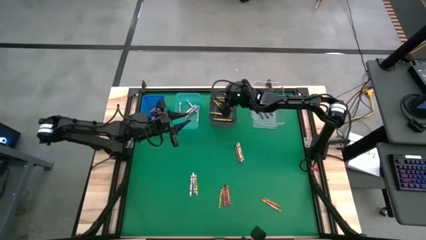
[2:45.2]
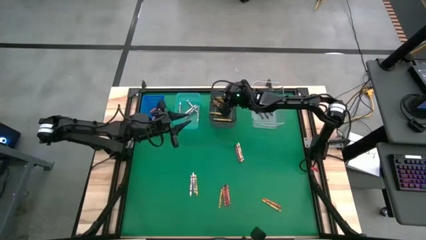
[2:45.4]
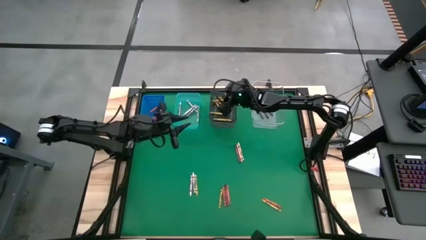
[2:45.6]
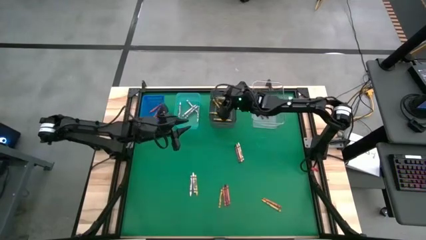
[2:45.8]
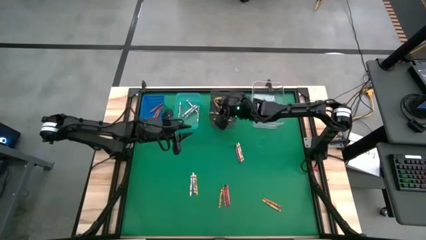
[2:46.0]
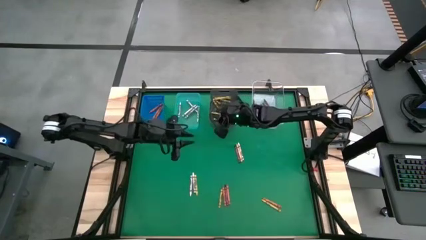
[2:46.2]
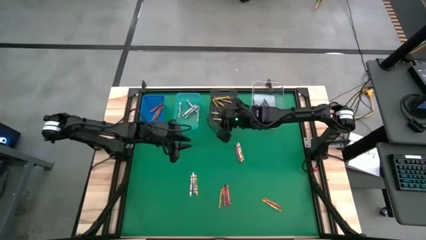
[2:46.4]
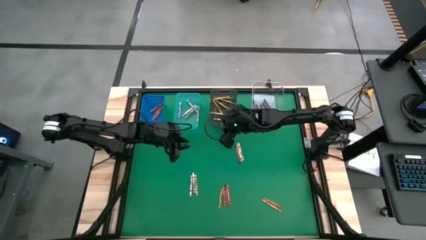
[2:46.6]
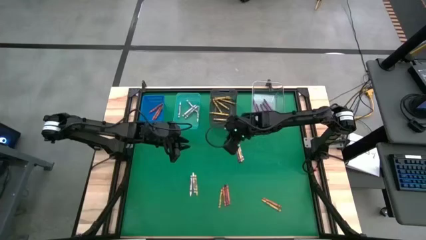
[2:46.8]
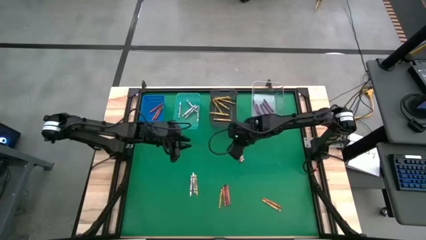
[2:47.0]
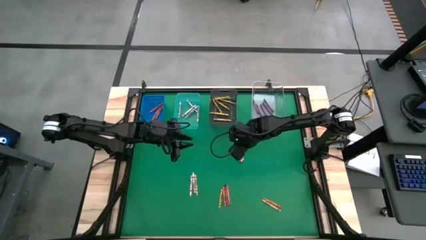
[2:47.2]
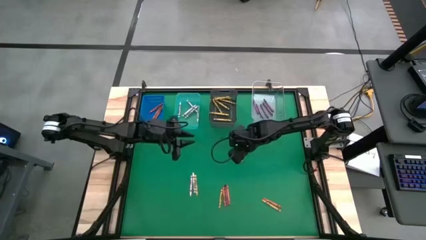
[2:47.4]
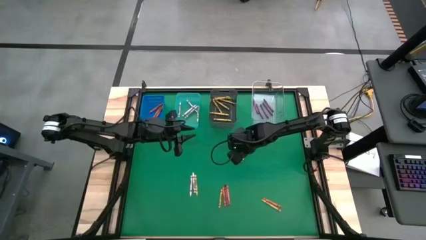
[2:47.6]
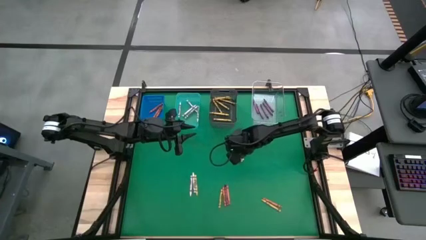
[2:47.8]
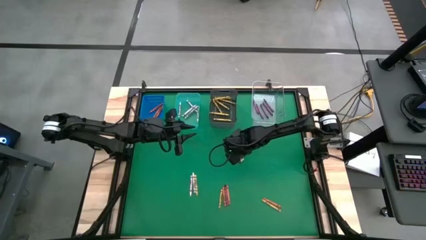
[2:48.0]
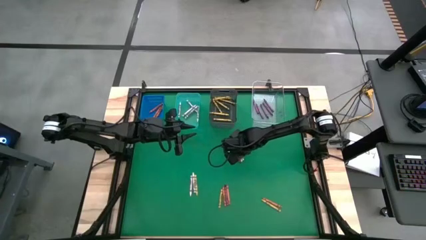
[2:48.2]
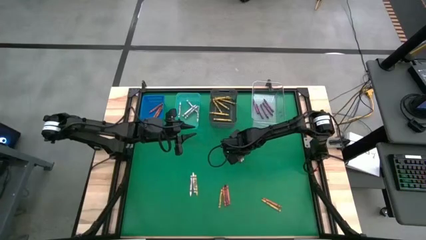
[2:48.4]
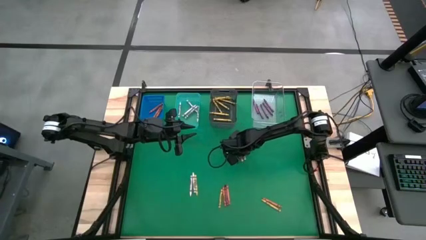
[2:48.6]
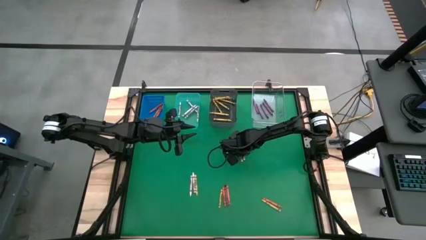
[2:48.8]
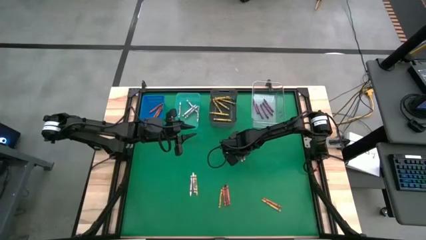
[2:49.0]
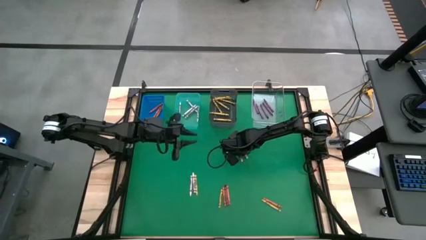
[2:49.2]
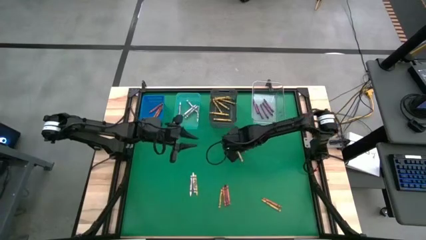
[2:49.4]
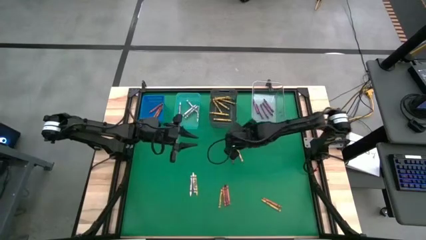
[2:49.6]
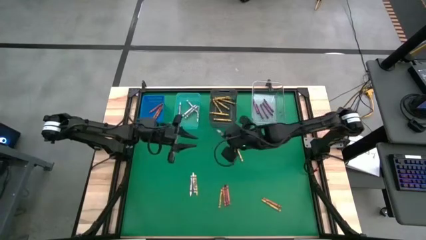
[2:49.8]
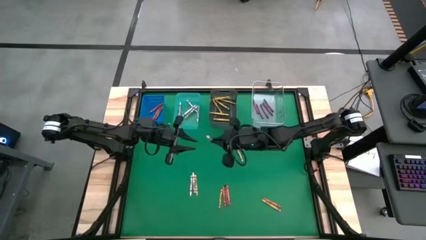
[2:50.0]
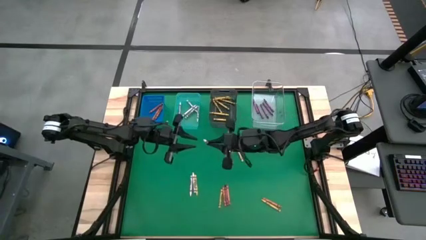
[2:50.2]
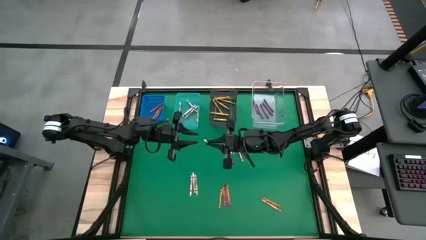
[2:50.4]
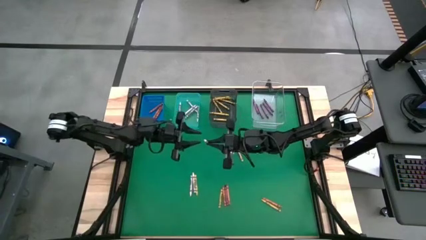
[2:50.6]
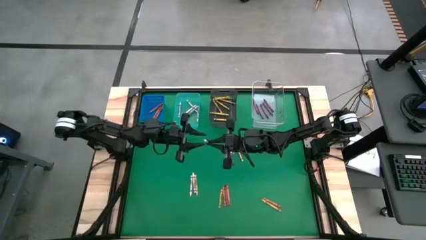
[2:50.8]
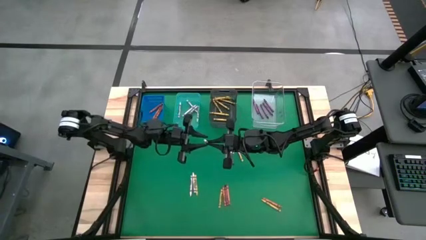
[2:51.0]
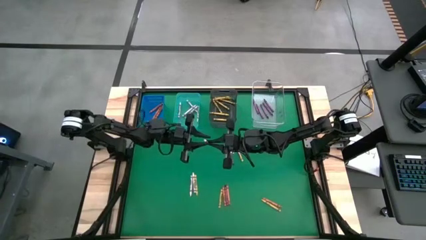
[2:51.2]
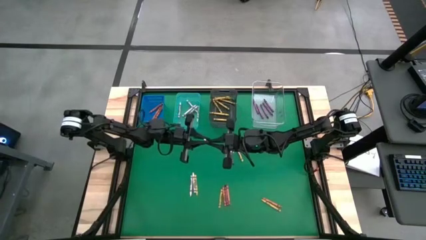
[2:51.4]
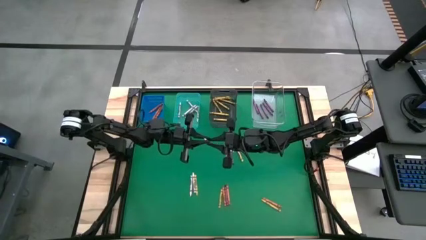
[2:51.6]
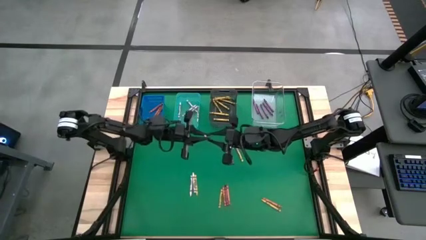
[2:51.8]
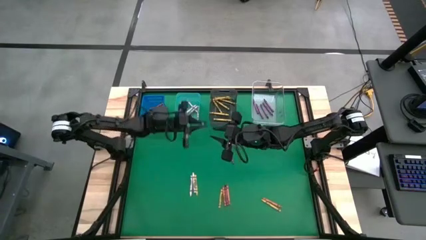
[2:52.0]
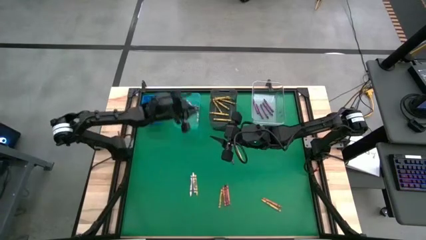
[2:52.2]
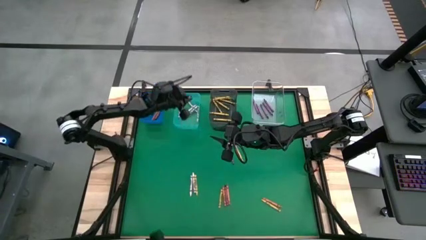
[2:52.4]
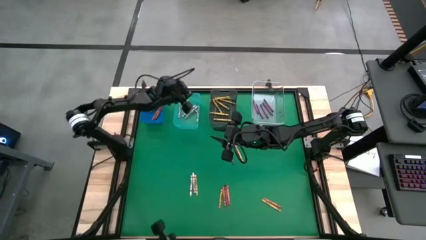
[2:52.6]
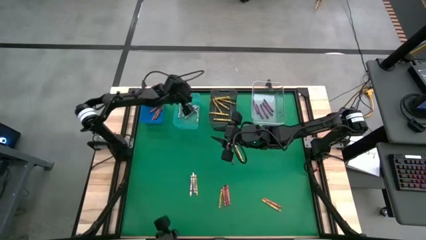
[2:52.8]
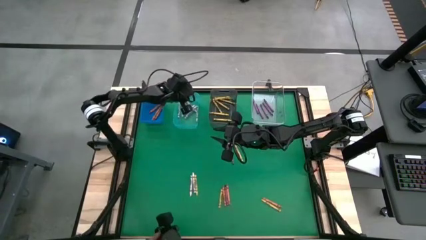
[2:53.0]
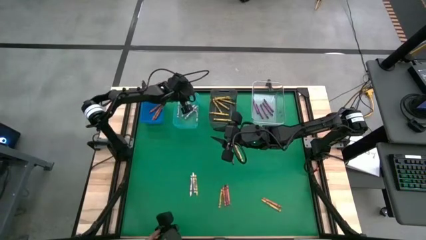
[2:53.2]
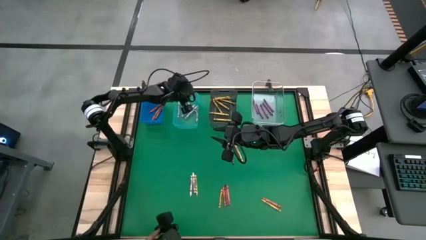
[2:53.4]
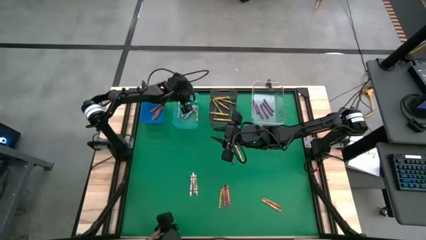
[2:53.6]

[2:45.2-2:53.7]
Task: Sort crayons
Put the white crayon into the light blue bin

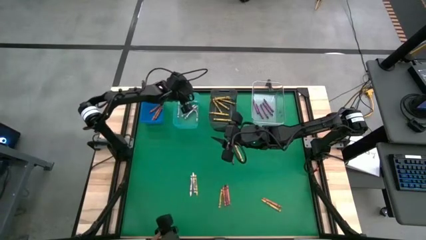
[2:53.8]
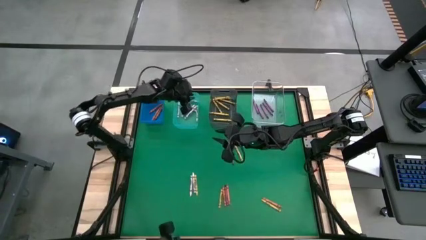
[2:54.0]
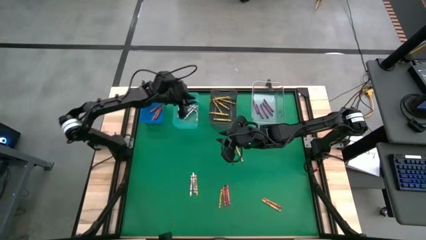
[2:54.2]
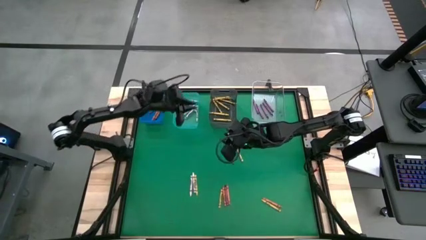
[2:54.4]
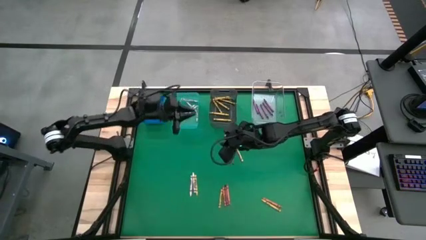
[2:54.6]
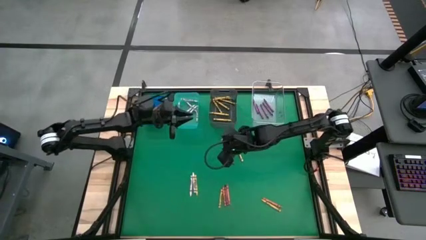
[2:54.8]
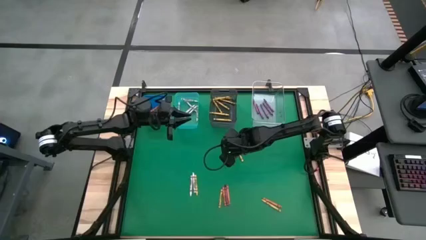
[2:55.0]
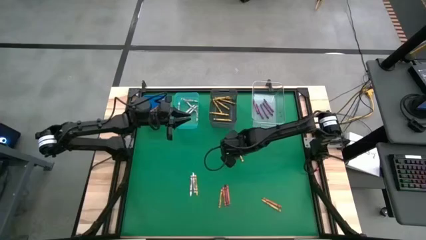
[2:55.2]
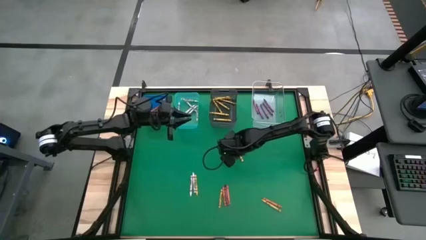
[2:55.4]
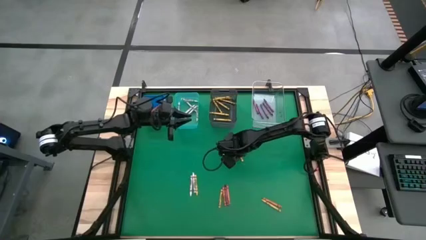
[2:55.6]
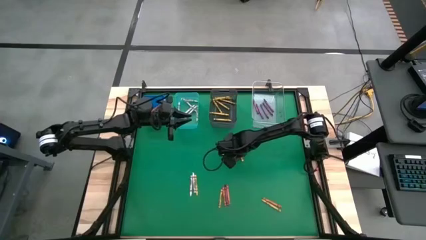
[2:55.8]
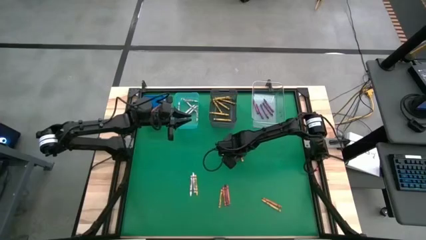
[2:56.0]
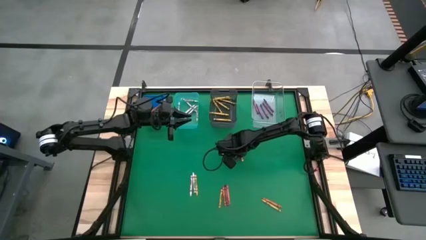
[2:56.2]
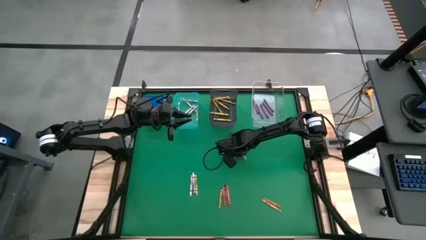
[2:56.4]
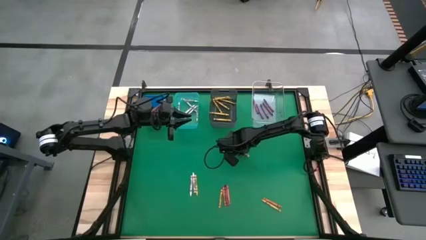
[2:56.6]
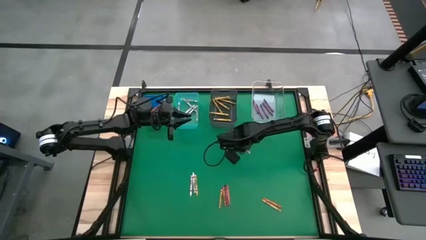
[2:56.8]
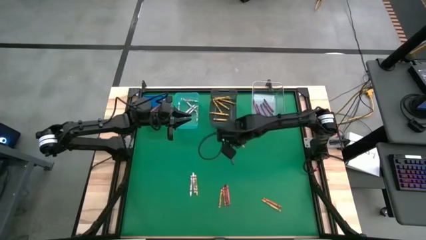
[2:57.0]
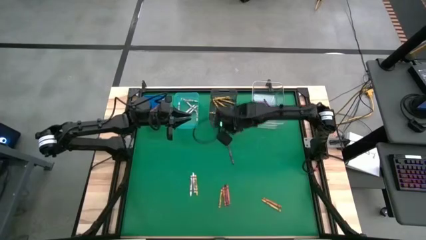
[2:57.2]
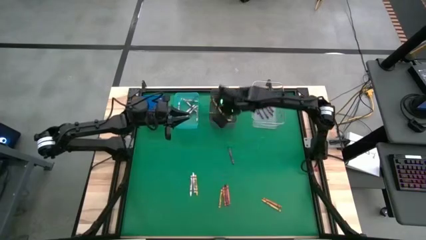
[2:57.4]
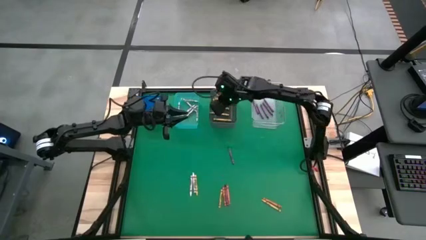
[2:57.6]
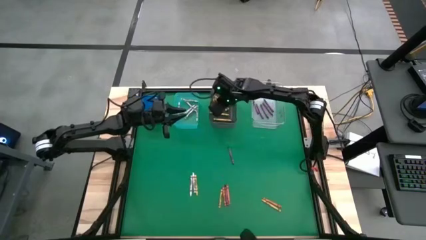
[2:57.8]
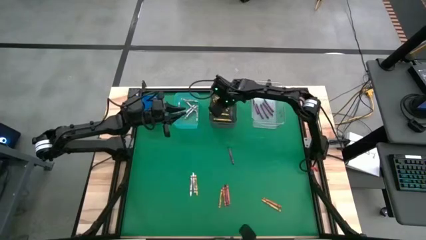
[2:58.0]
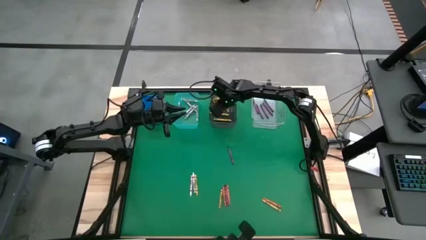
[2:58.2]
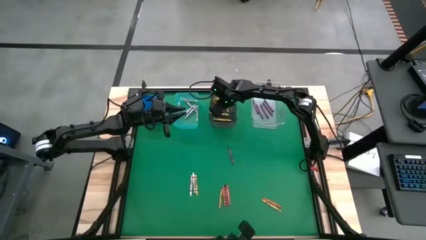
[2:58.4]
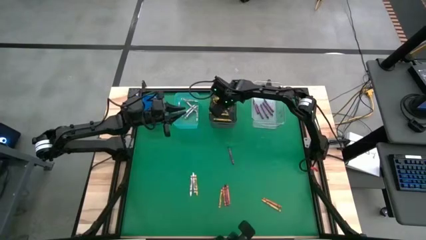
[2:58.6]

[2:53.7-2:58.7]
Put the yellow crayon into the black bin
